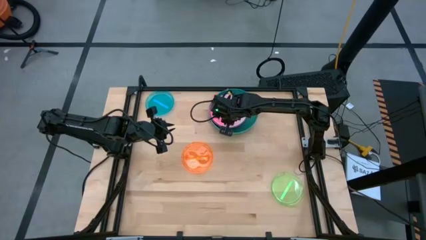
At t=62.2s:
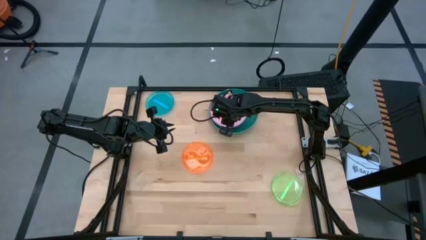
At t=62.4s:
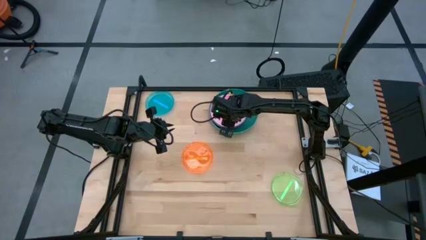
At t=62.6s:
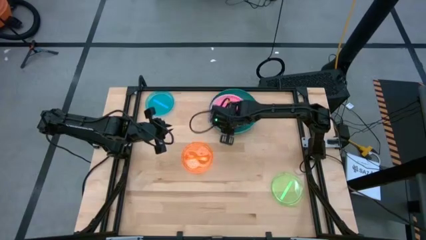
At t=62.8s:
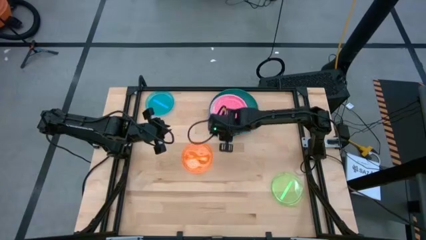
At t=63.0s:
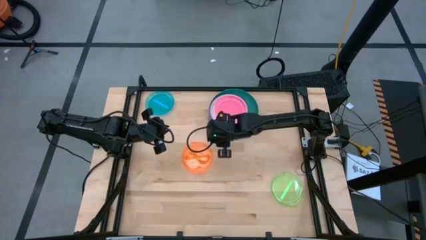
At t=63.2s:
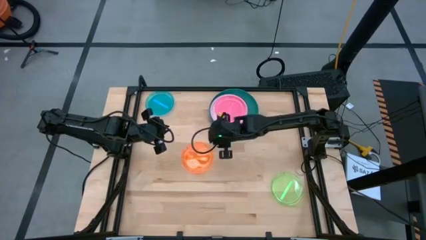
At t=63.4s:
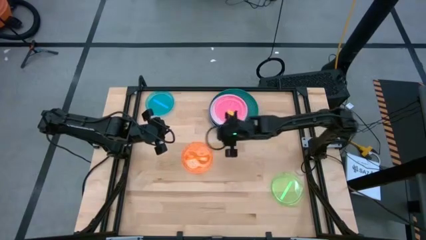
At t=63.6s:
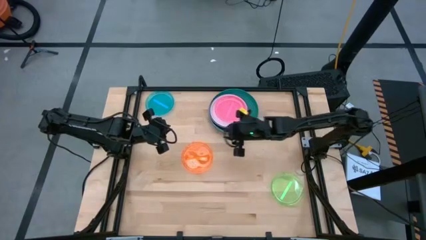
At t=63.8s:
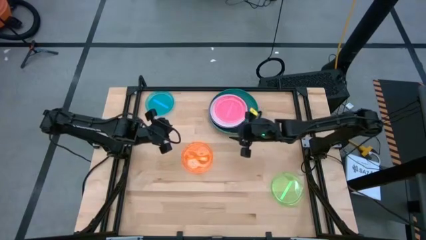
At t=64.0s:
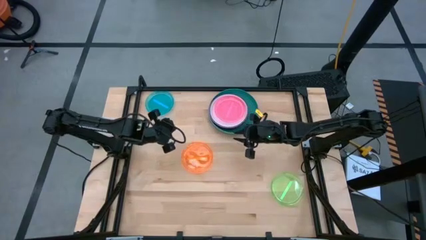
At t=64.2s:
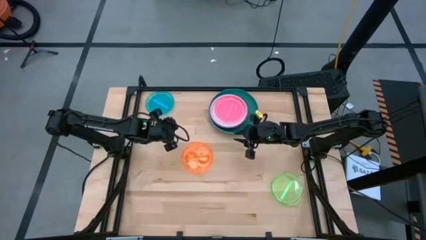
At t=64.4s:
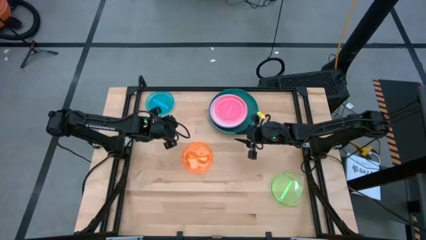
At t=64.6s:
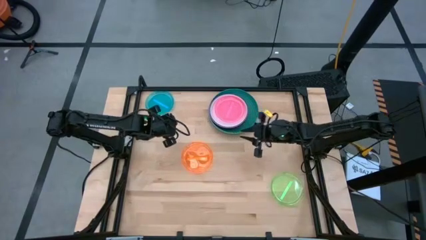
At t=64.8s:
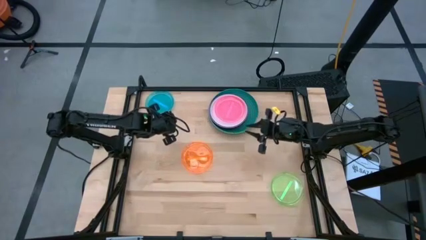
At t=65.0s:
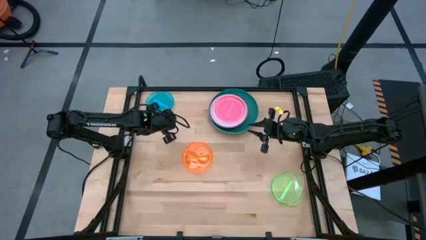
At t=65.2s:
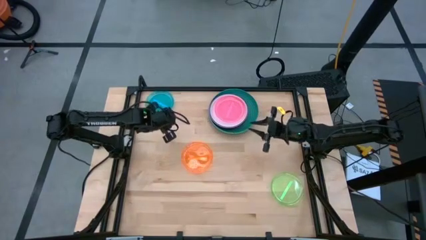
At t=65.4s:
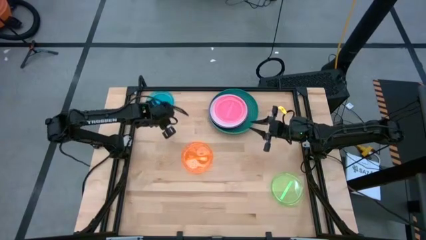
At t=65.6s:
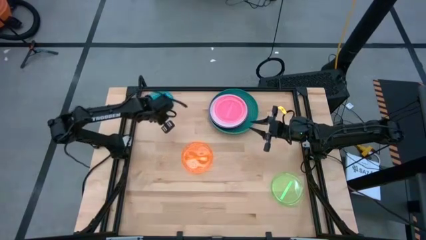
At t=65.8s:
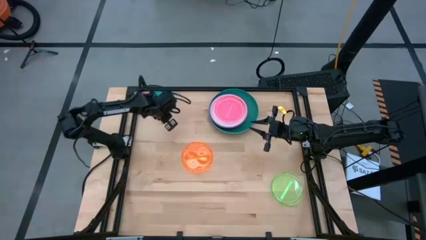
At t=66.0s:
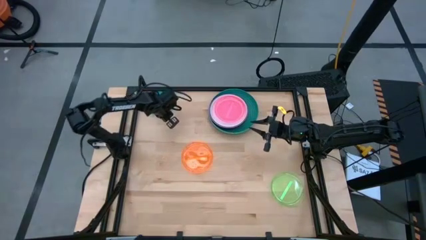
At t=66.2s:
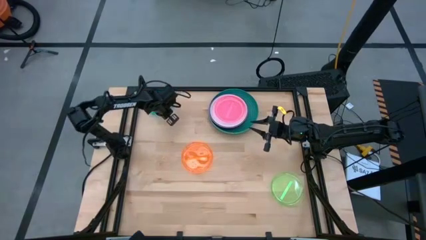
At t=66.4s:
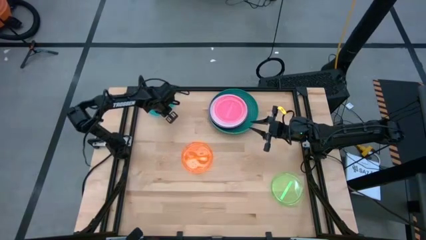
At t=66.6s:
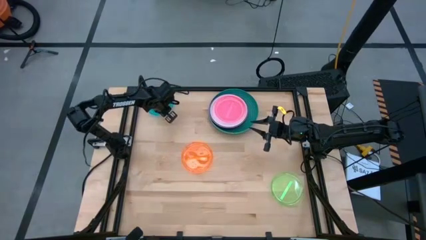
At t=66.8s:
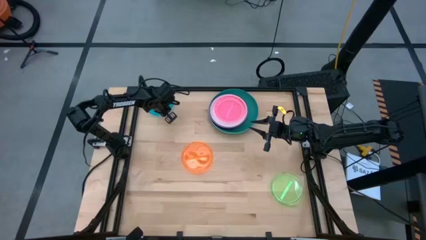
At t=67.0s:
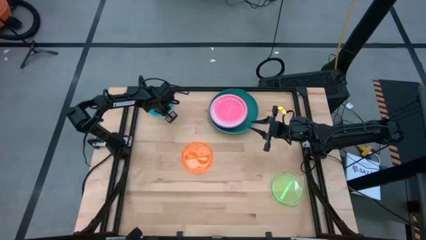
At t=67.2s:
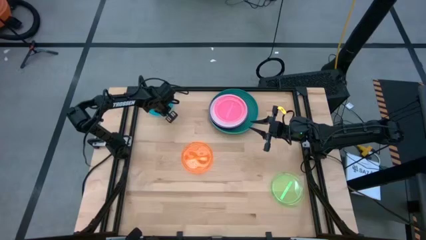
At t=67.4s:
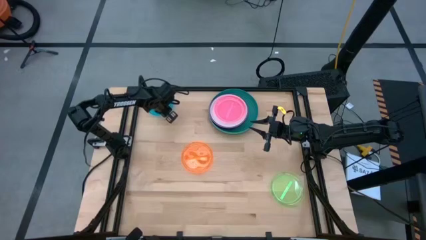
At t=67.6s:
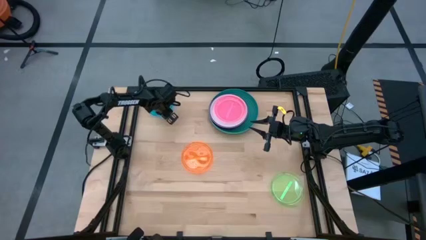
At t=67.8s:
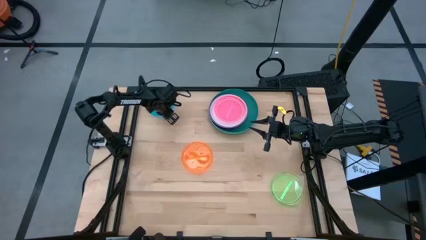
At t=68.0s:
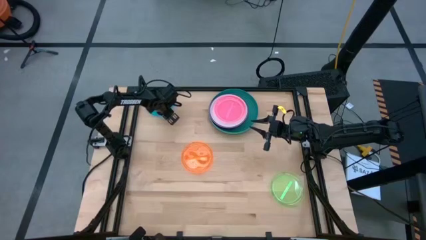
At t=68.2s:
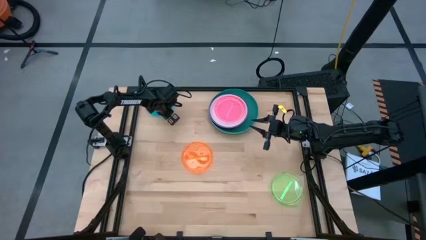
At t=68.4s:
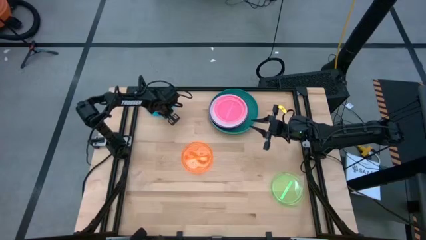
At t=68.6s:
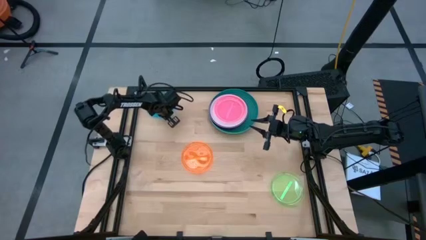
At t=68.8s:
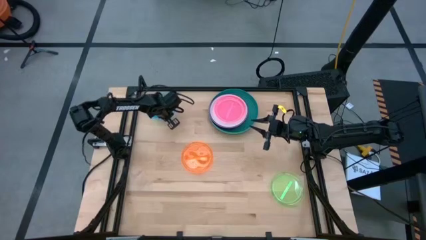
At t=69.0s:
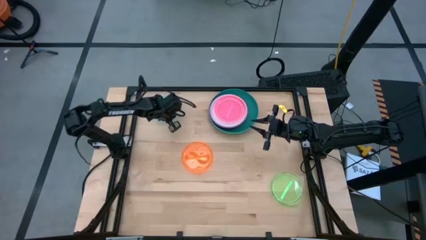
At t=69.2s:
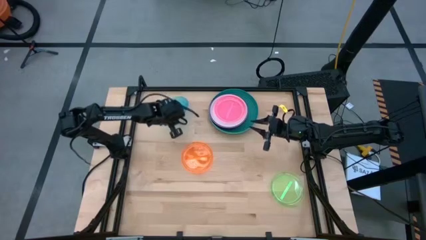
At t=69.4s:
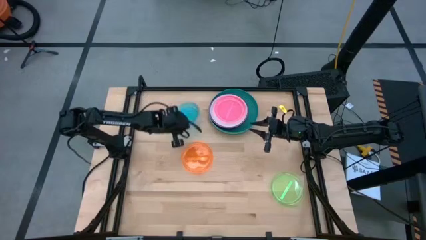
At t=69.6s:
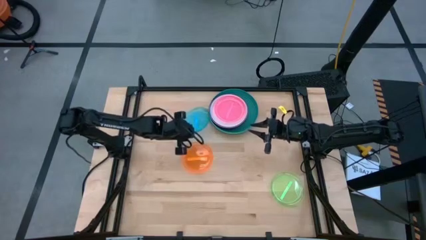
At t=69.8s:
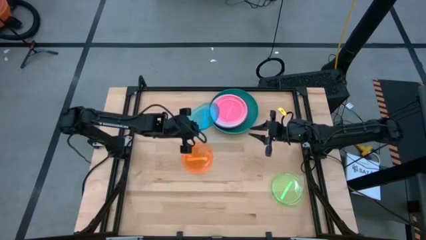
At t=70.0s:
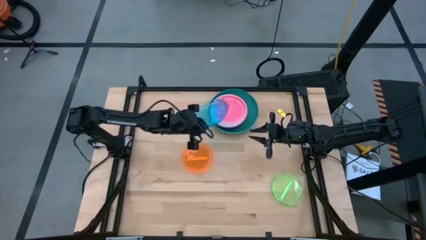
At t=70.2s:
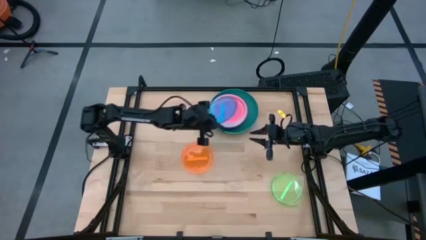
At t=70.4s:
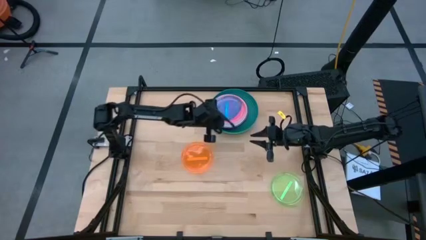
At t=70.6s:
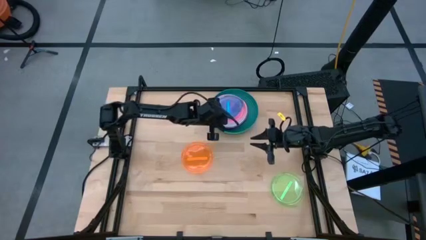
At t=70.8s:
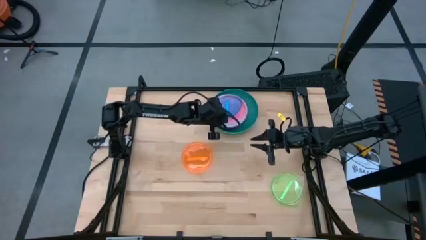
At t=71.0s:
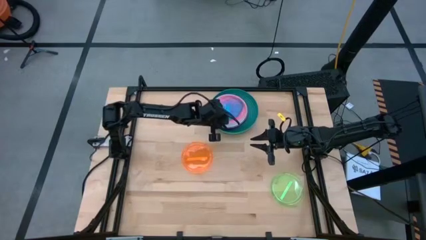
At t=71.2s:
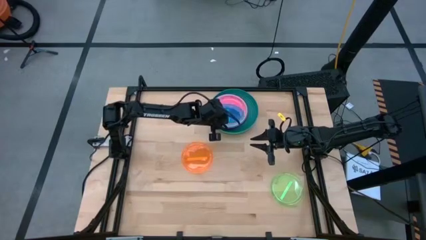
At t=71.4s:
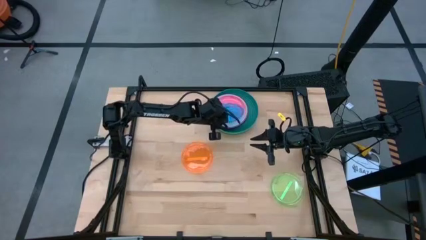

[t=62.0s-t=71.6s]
Task: Stack plastic plates
Stack the small blue plate on top of the small pink plate

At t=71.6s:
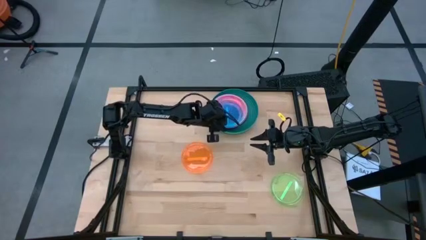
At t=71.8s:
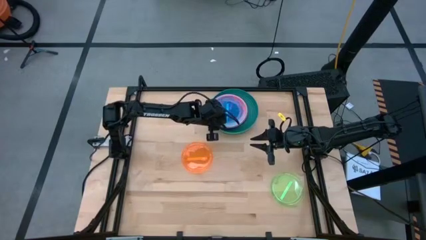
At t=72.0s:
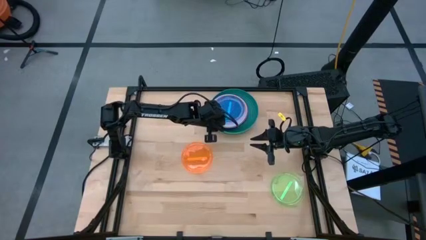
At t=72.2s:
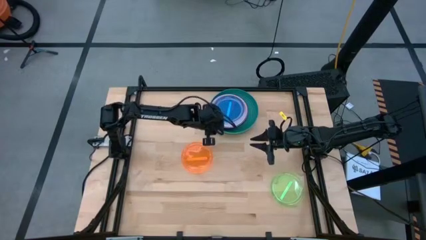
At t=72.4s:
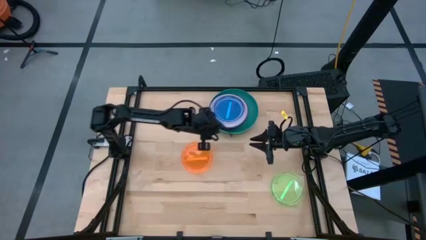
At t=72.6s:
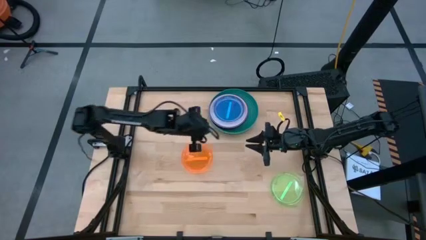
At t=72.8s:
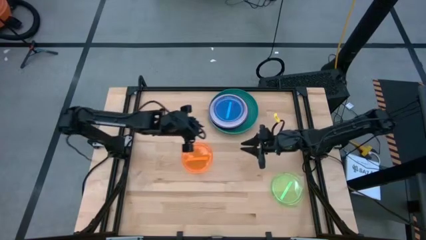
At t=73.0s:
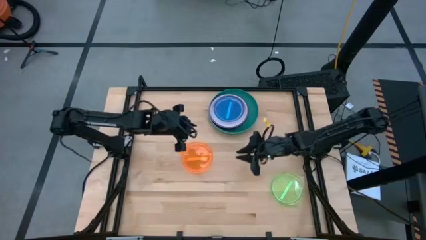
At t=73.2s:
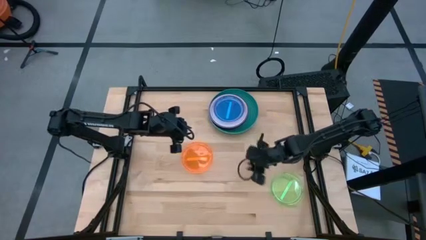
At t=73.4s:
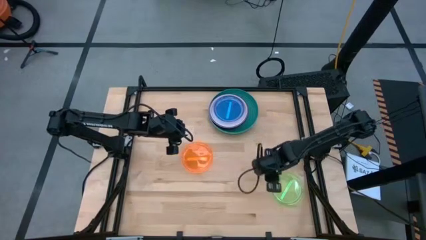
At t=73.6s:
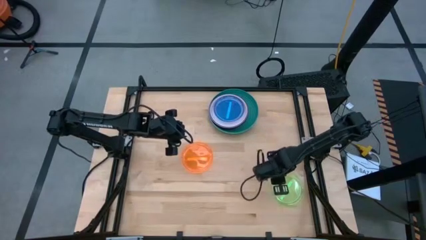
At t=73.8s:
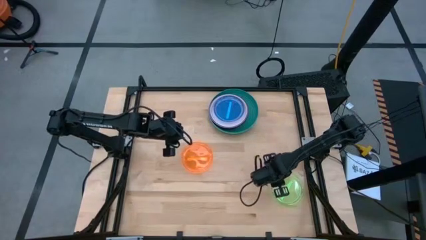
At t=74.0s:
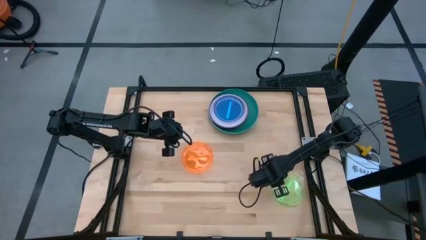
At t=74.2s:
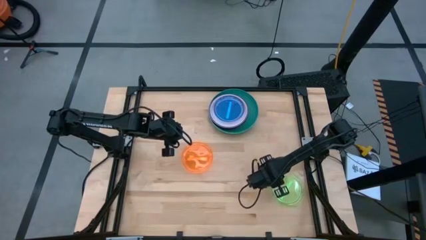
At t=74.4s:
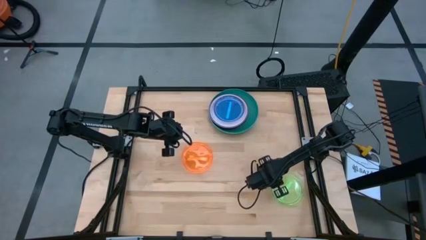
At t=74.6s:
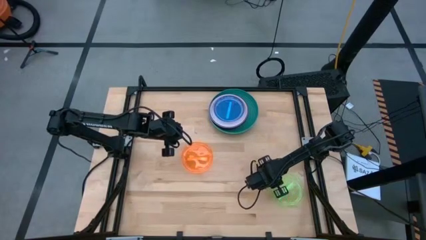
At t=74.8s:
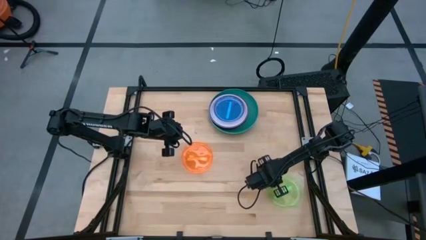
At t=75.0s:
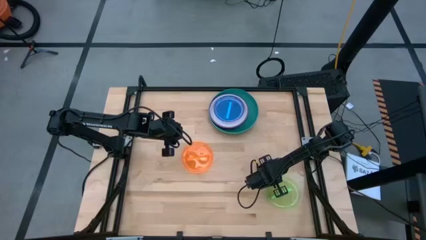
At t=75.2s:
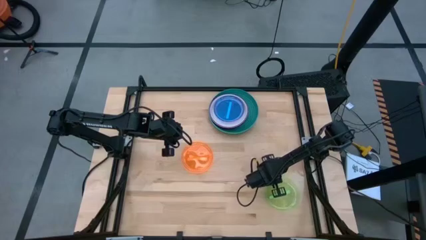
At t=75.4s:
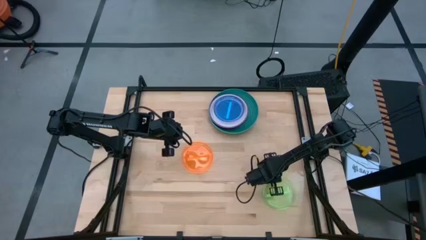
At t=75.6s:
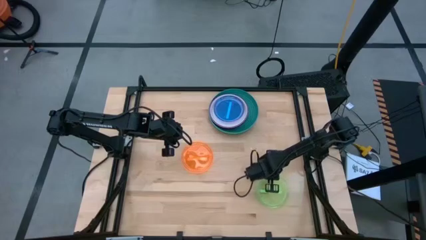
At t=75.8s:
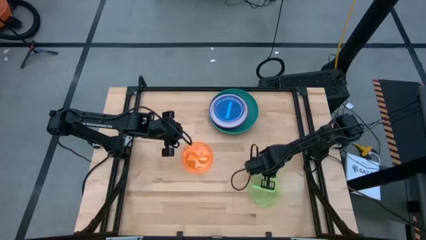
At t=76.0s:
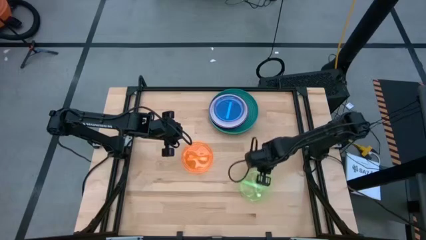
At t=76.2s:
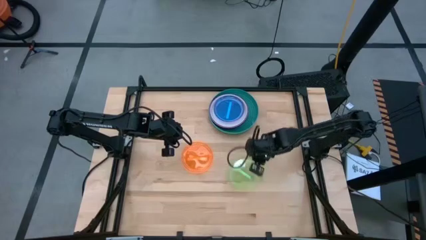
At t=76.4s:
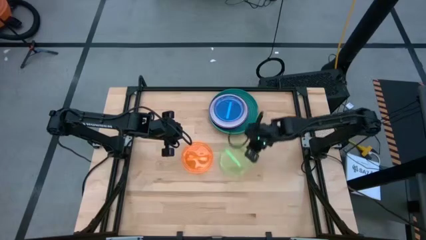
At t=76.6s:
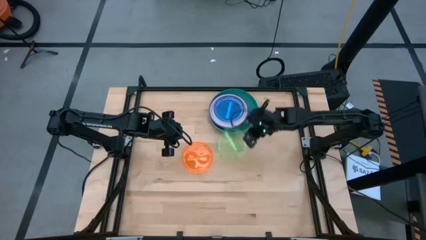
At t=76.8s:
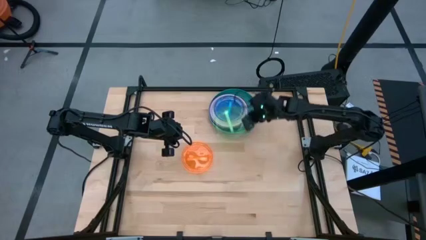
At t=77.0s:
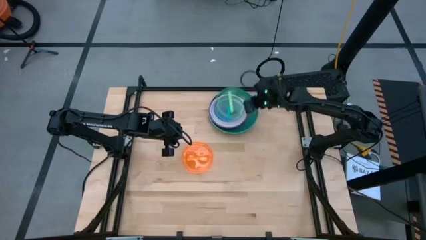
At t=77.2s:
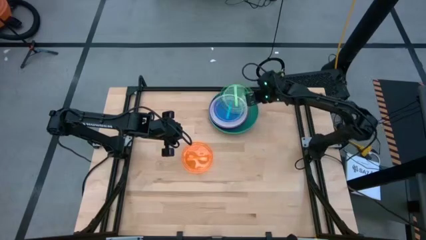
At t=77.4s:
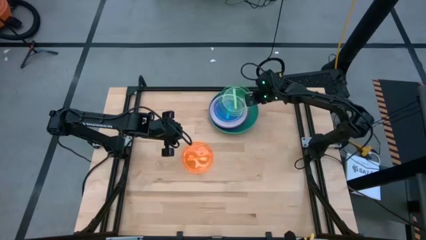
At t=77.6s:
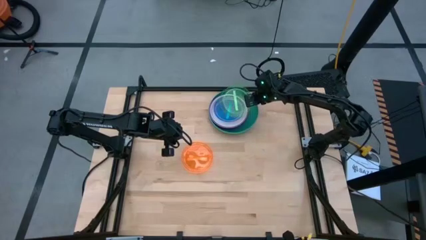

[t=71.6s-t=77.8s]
Stack the small green plate on top of the small blue plate
